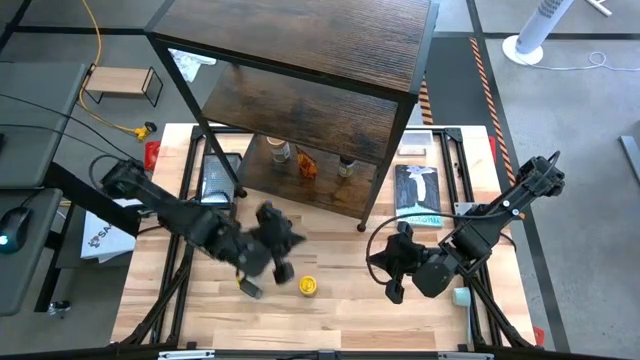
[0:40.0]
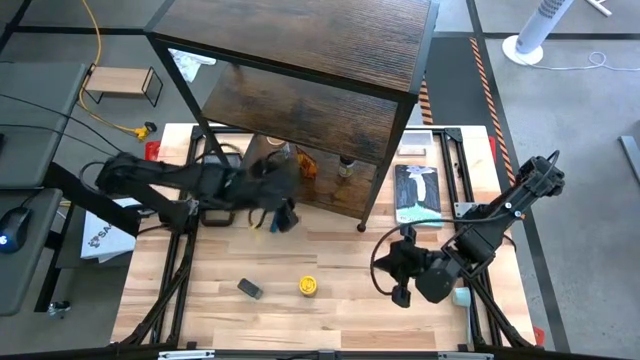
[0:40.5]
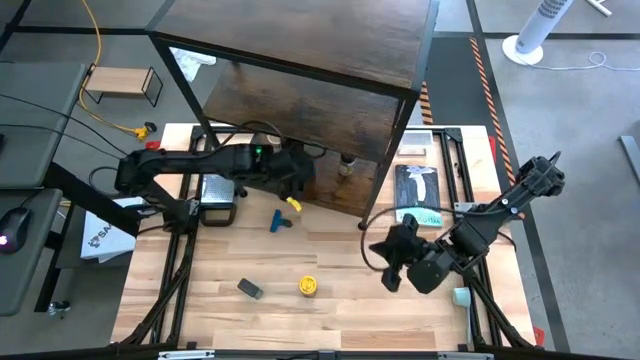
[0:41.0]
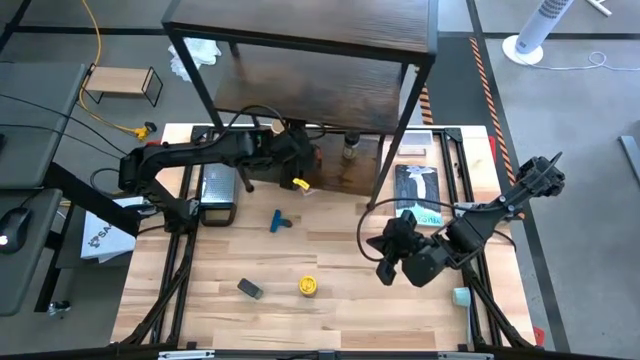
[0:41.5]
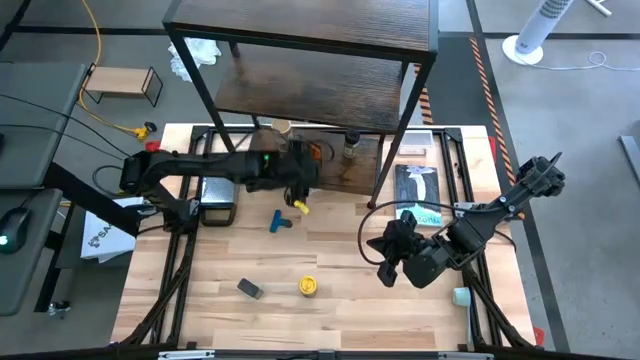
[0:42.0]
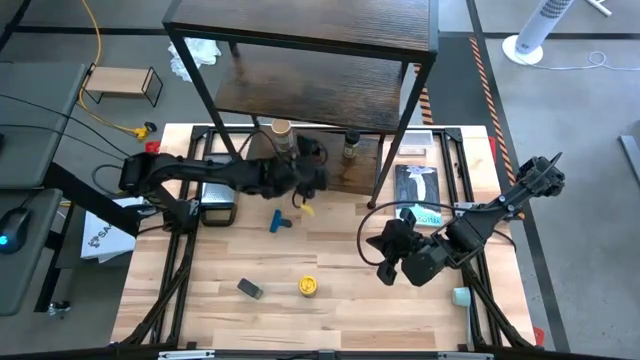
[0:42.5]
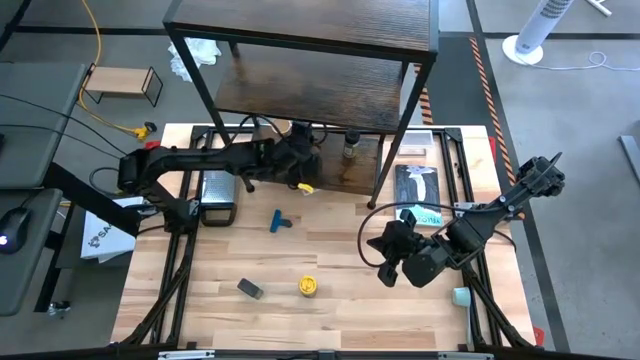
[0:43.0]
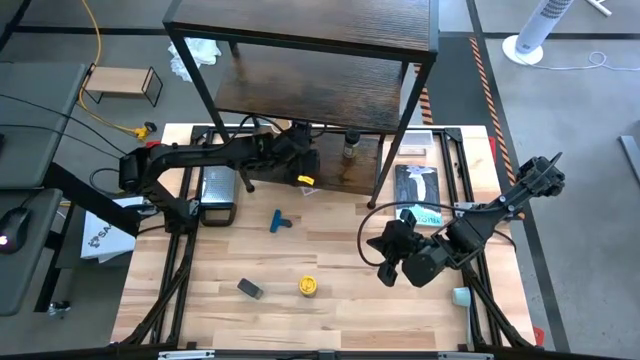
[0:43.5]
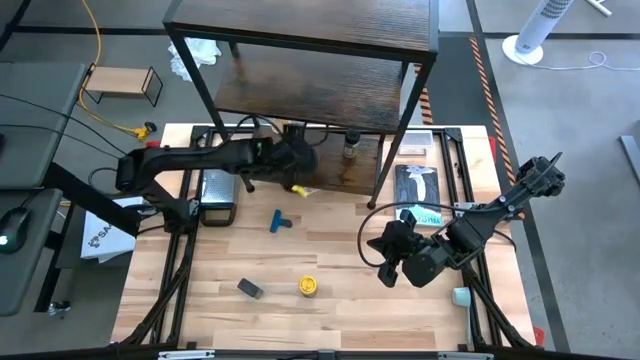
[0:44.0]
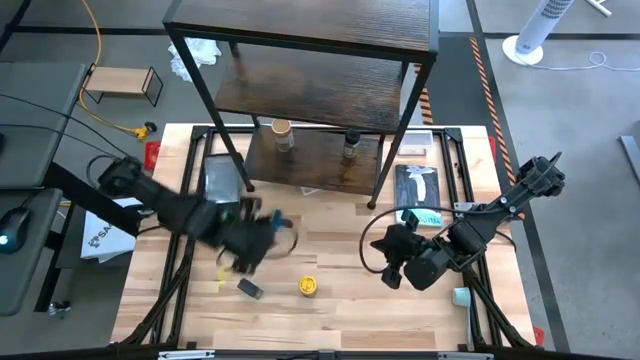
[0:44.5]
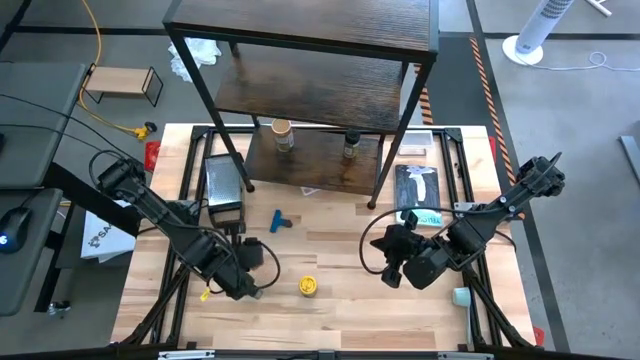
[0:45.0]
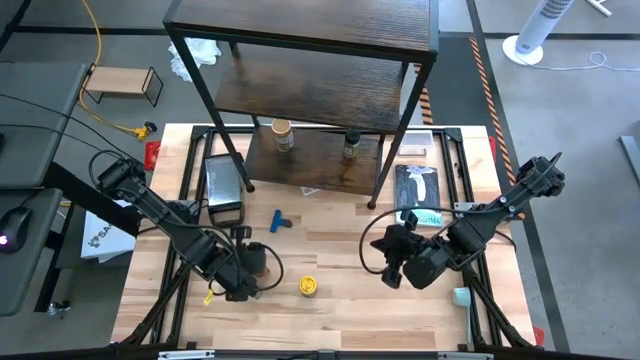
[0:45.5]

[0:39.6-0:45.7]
Task: Shelf spices
Remove the brown seasoning pack from the shelf

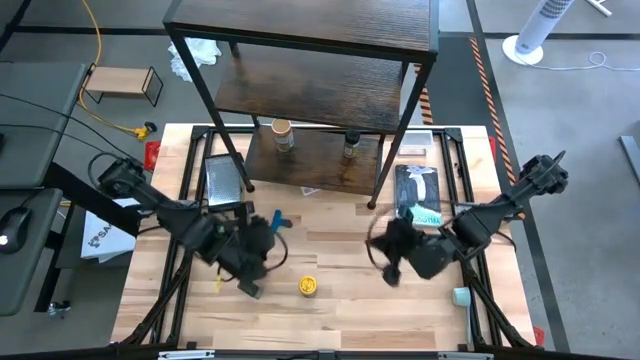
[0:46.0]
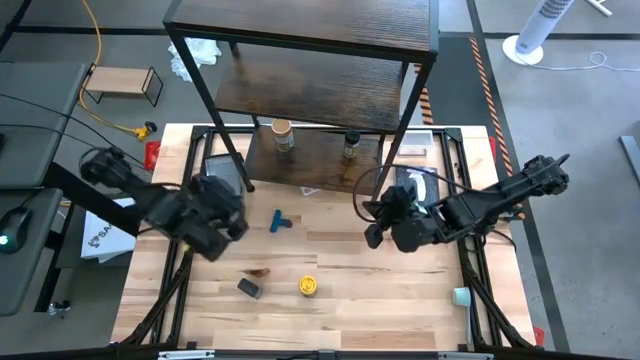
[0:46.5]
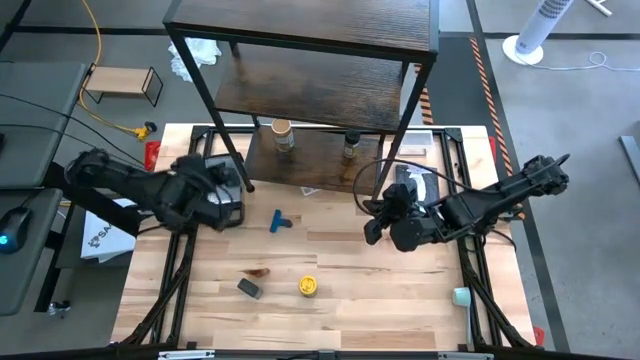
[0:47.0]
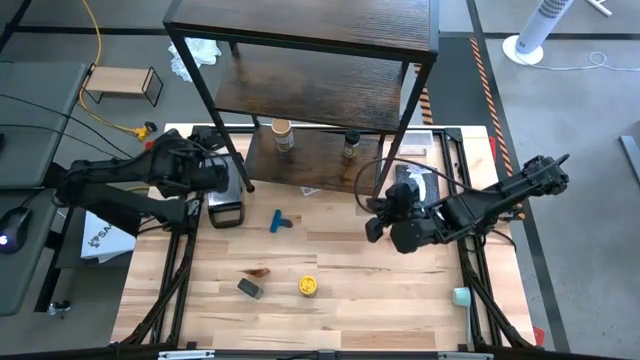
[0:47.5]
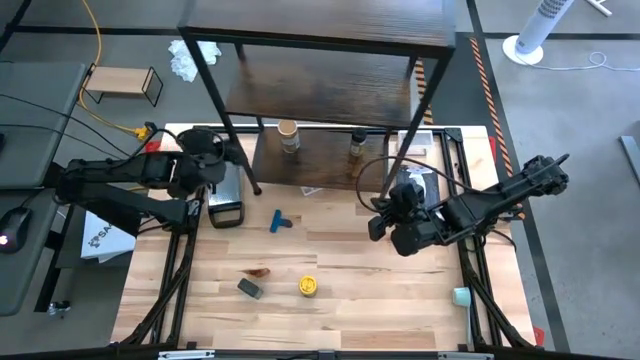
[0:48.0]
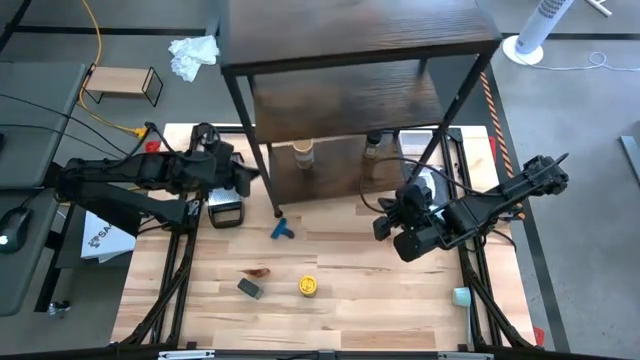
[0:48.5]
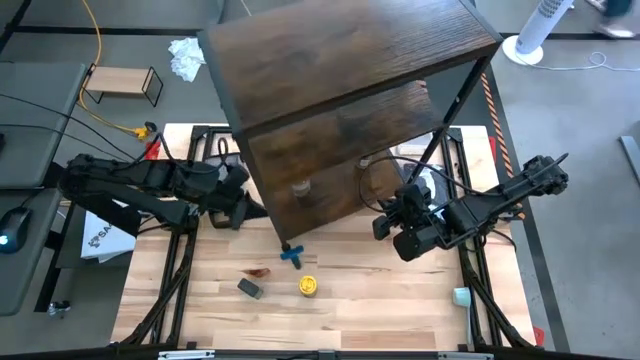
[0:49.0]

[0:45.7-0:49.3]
Adjust the shelf

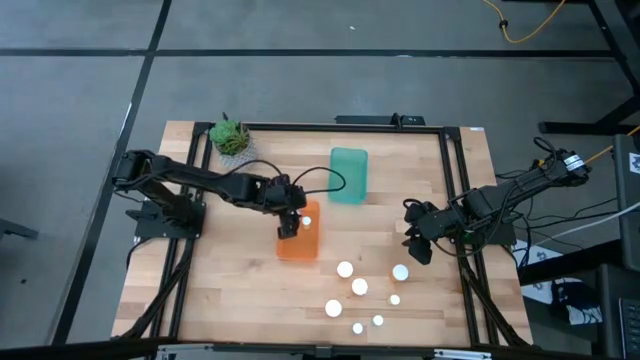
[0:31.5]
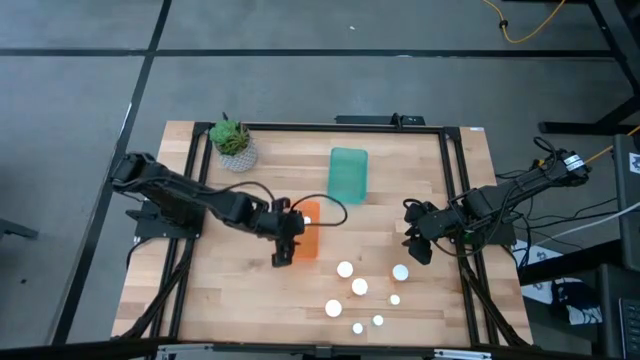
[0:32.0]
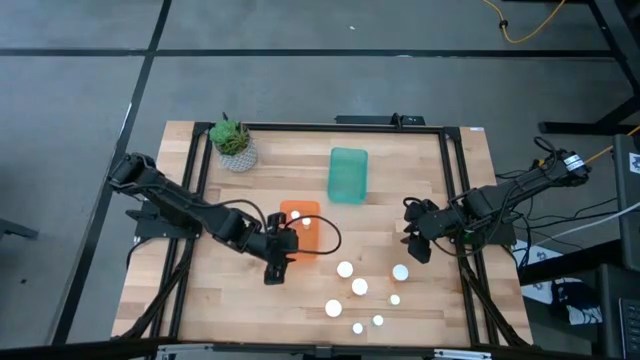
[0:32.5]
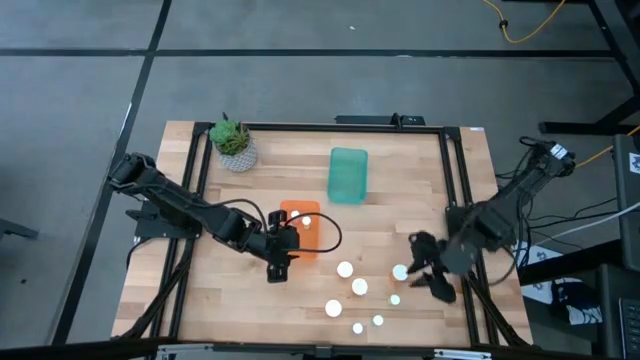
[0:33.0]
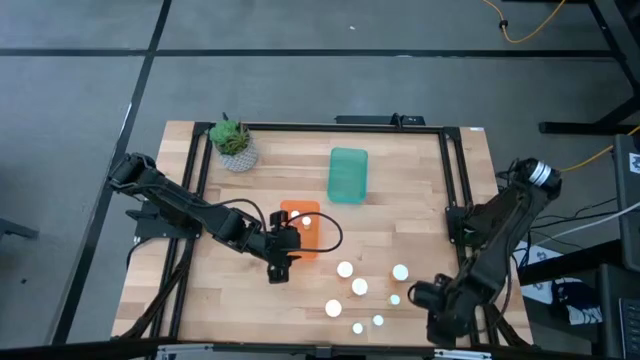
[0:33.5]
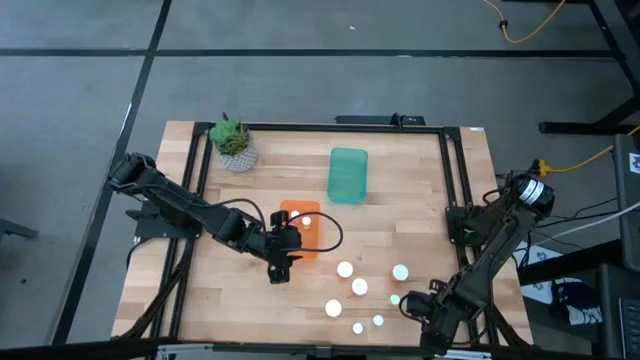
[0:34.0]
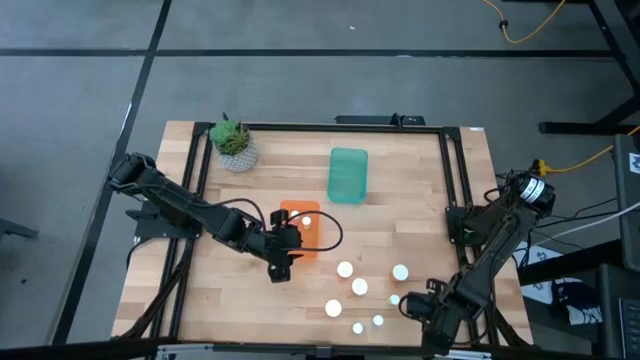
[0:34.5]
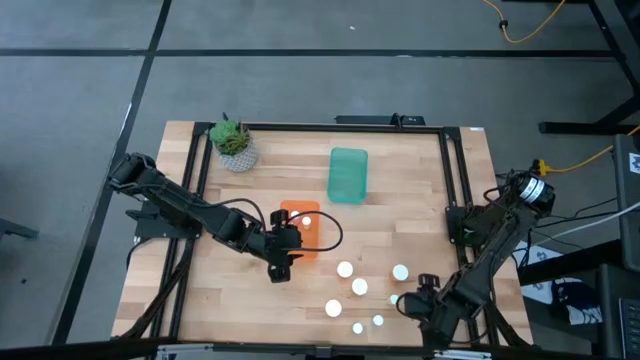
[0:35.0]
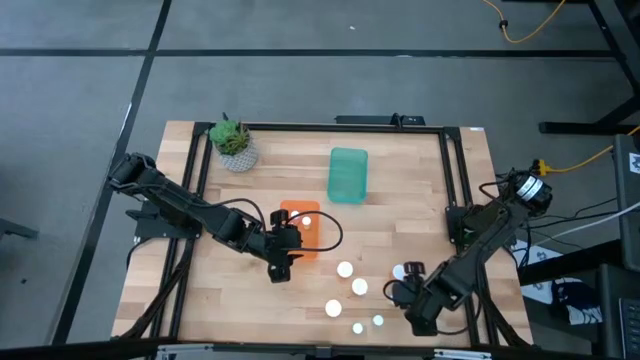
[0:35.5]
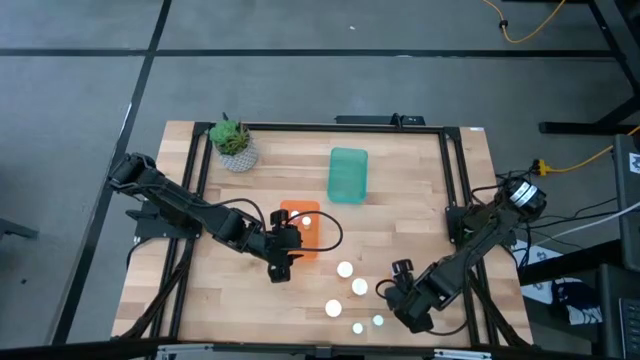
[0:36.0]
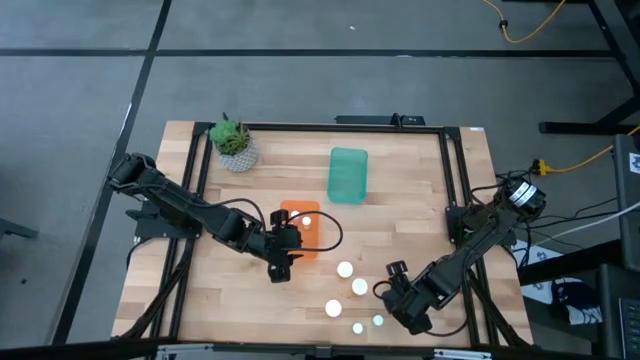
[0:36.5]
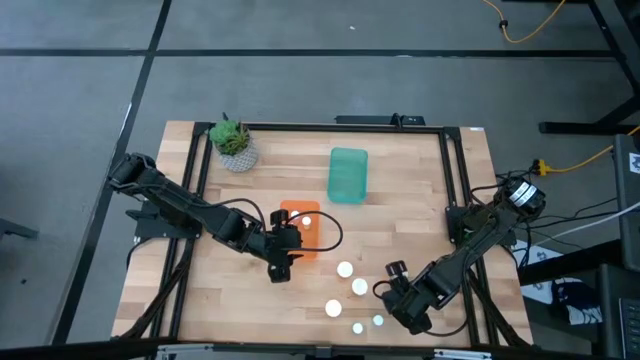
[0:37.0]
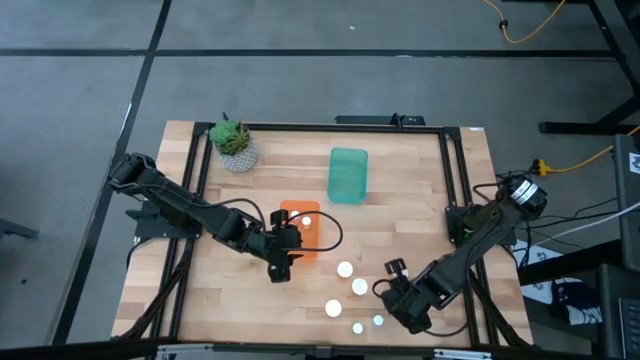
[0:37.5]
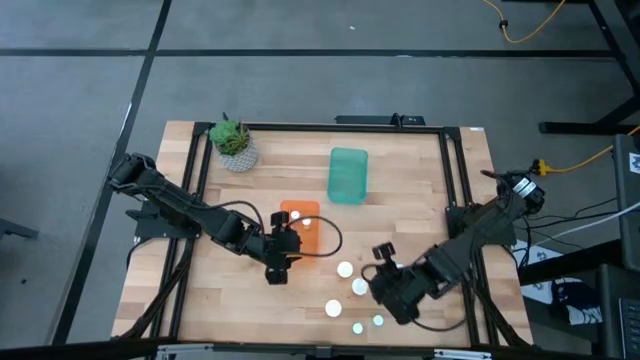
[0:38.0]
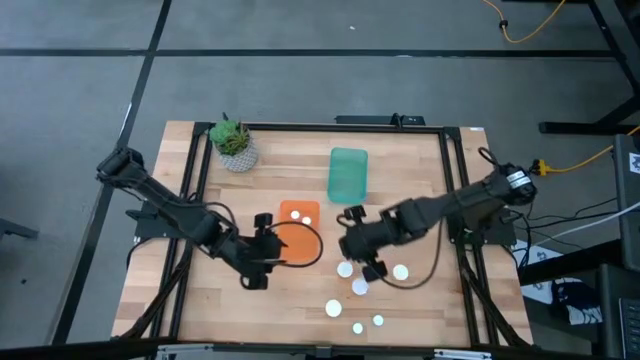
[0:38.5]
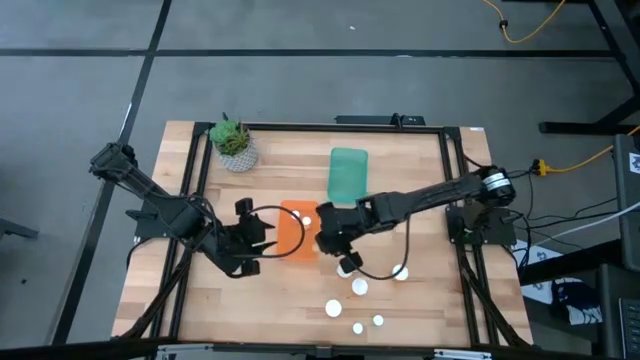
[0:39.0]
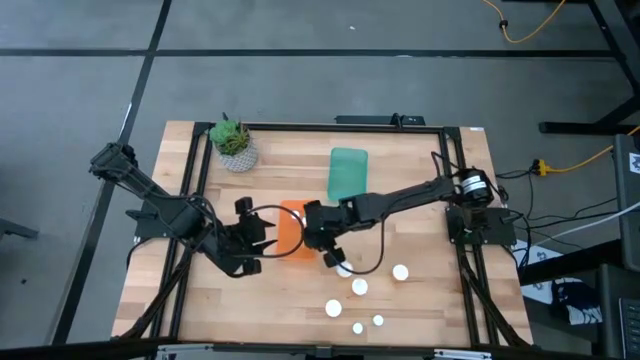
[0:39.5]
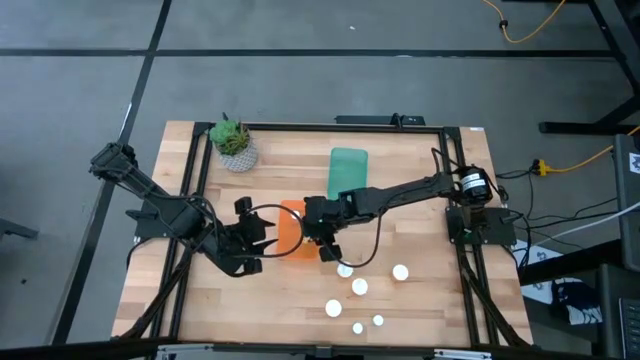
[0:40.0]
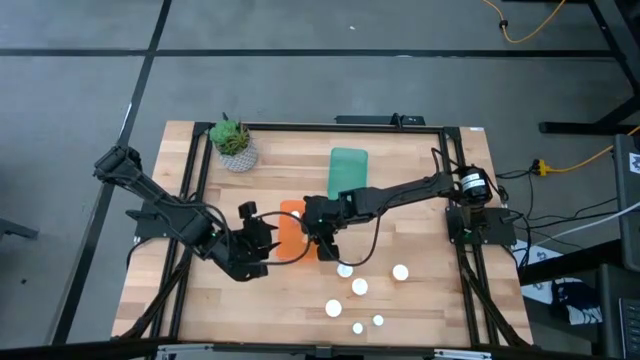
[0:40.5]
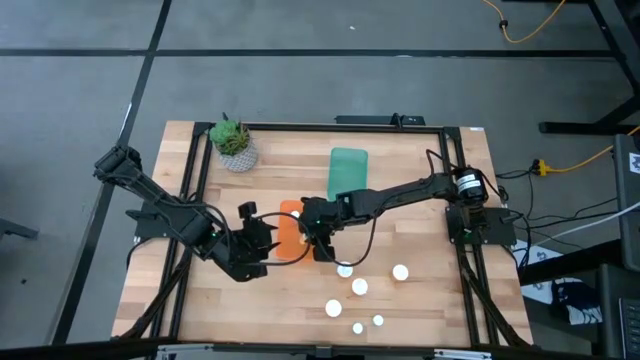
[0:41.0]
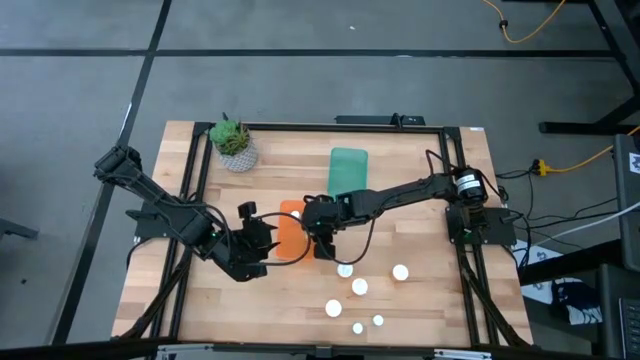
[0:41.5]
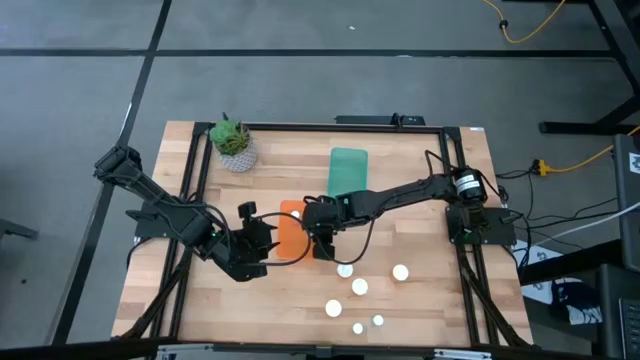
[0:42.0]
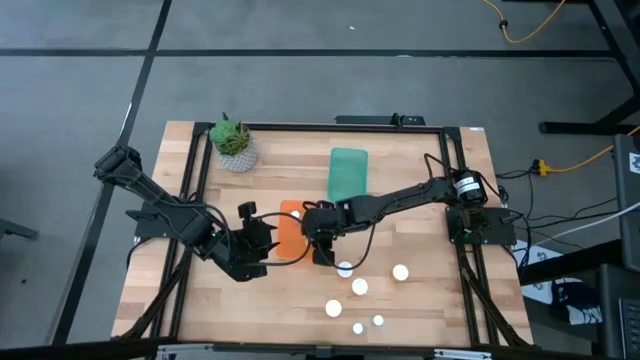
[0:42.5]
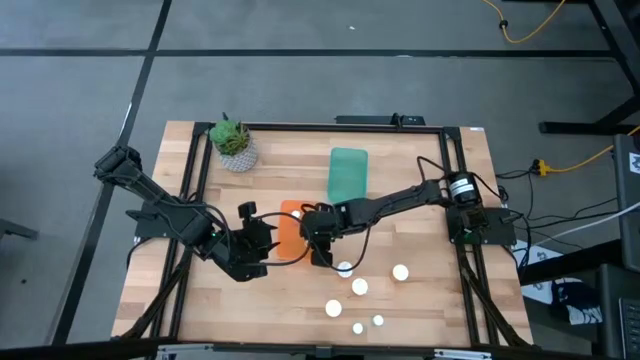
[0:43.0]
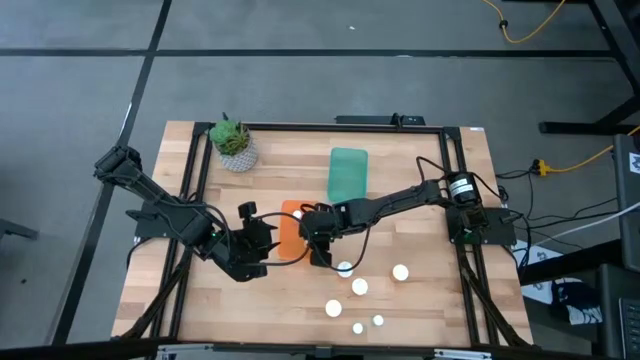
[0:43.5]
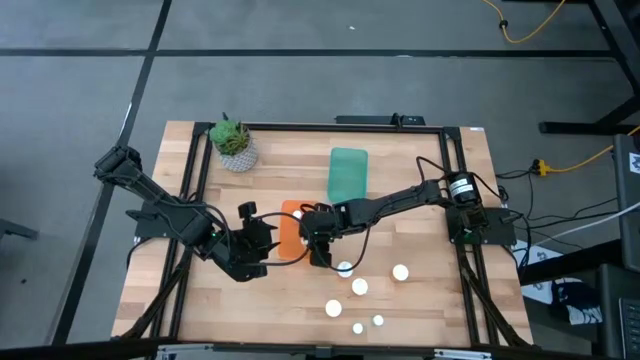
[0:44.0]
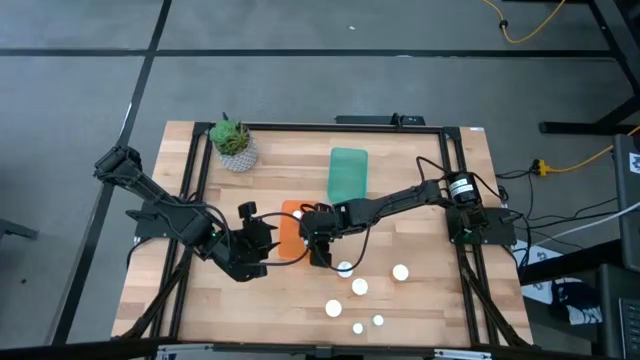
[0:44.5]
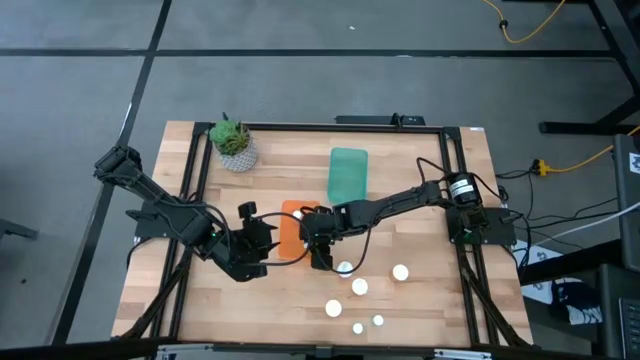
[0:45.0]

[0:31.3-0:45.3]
Task: Pick and place medicine bottles into bin by pill shape (circle, oval)
Put the small yellow pill bottle into the orange bin
